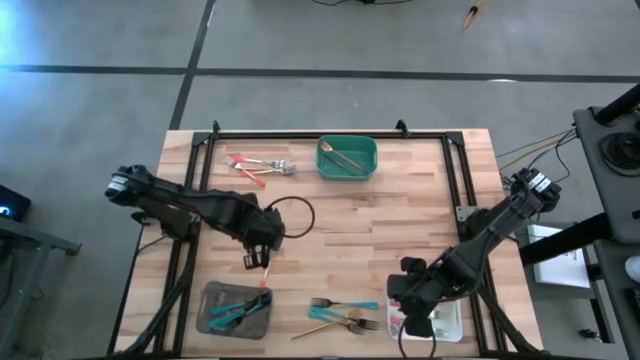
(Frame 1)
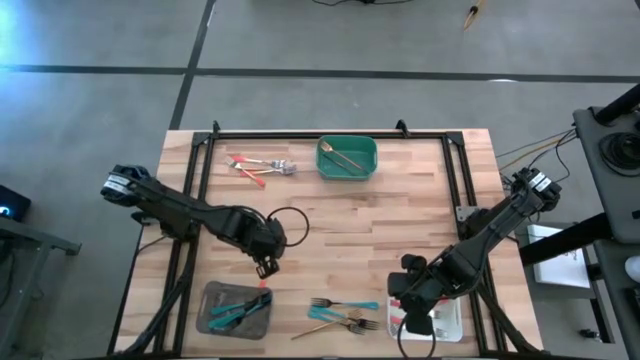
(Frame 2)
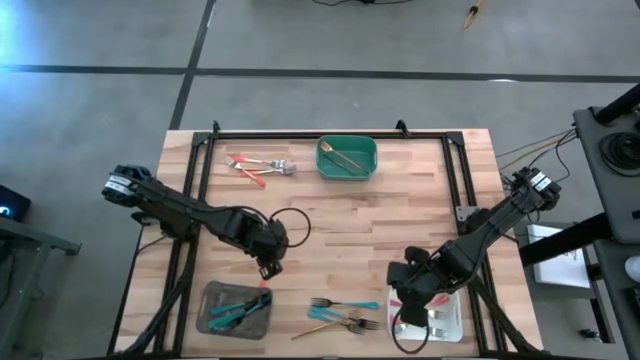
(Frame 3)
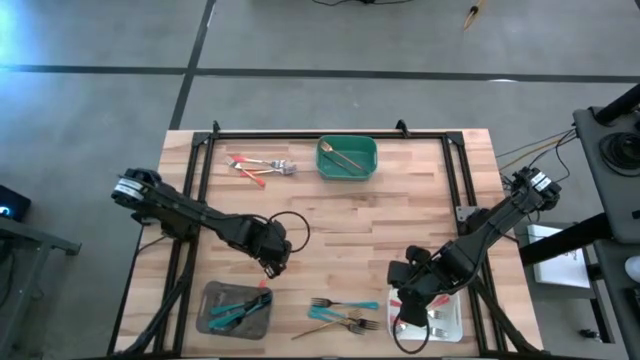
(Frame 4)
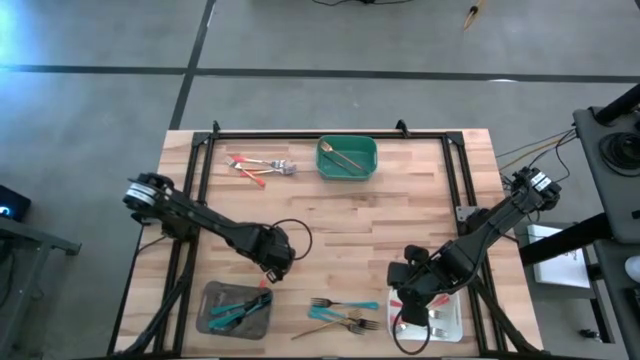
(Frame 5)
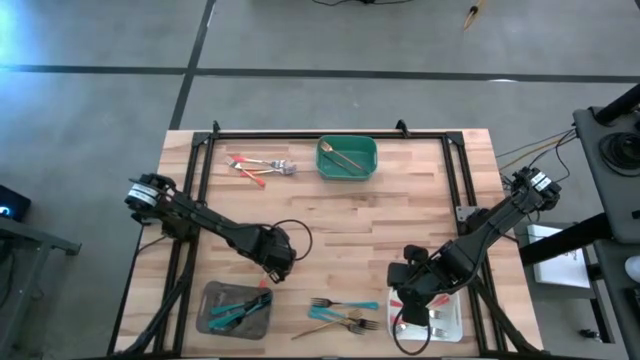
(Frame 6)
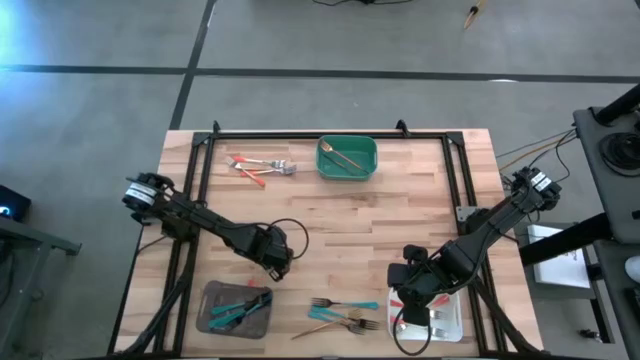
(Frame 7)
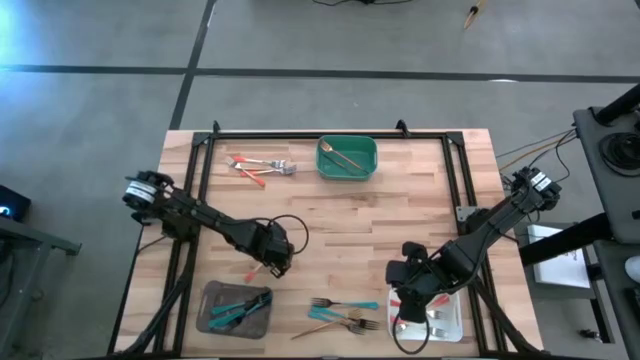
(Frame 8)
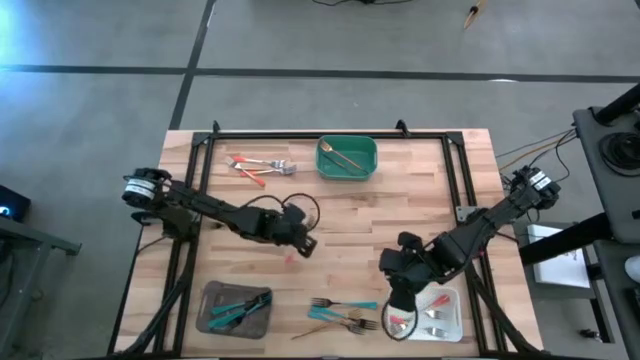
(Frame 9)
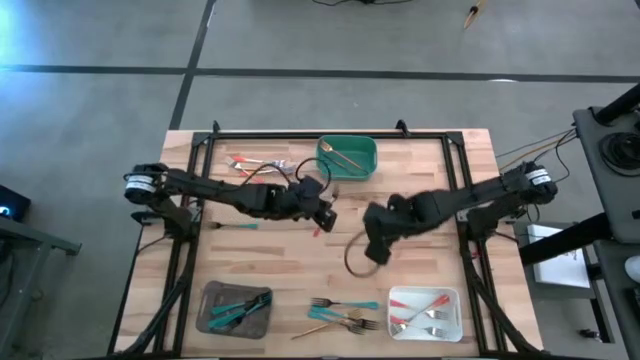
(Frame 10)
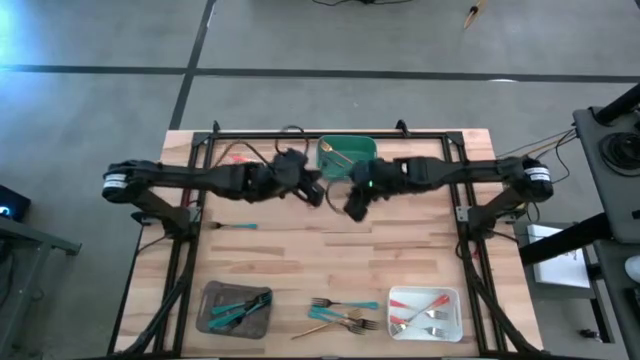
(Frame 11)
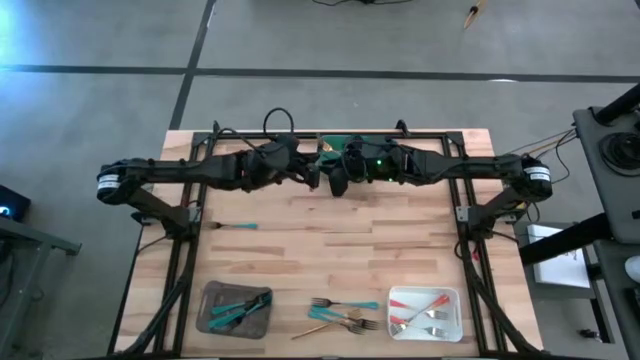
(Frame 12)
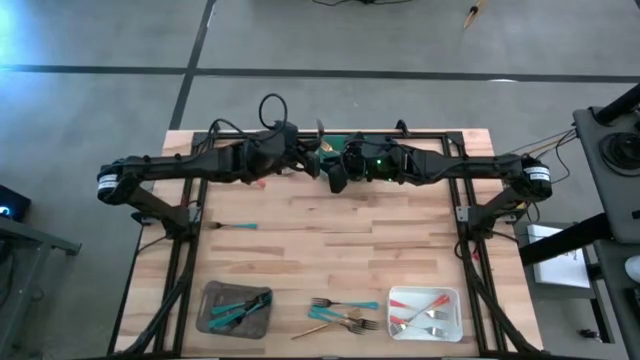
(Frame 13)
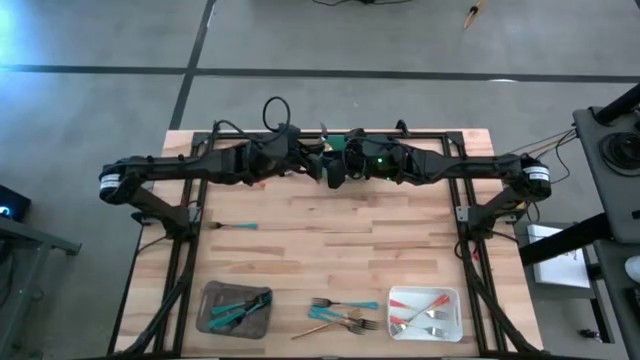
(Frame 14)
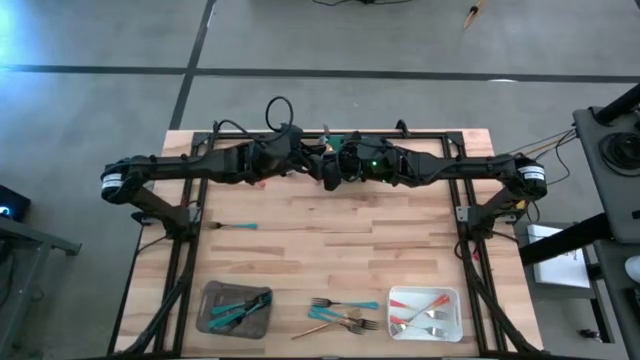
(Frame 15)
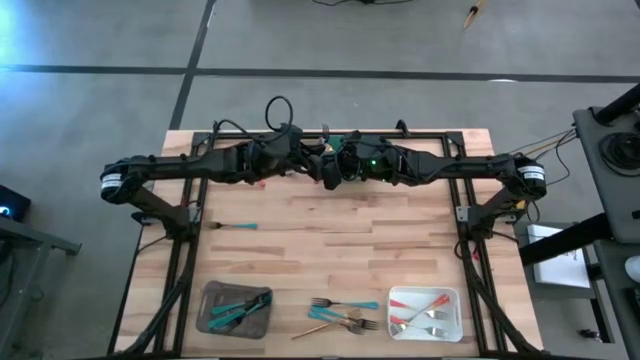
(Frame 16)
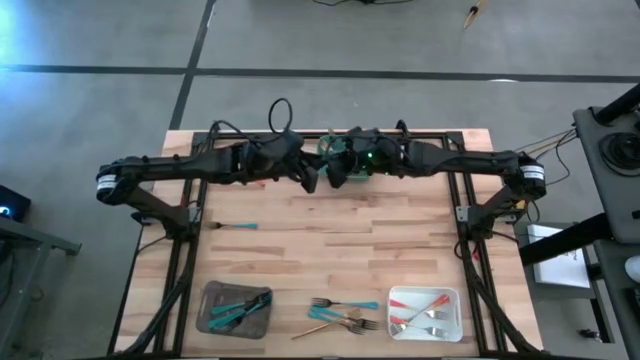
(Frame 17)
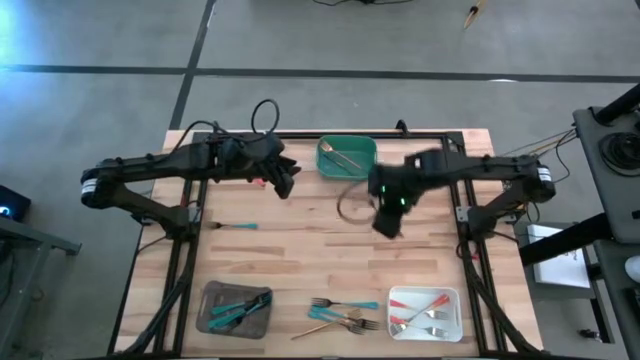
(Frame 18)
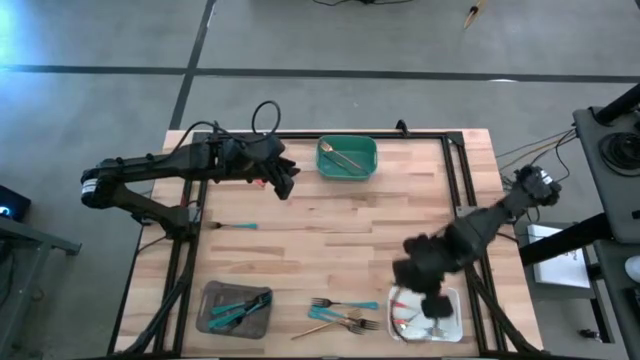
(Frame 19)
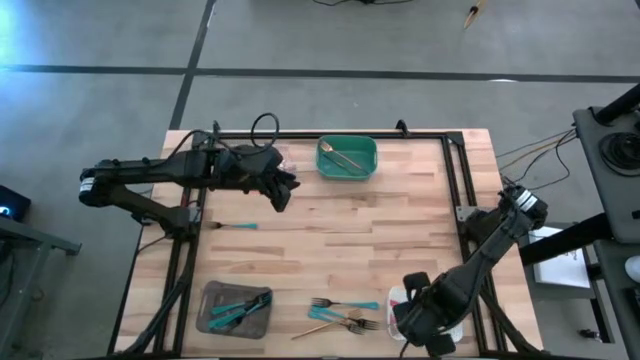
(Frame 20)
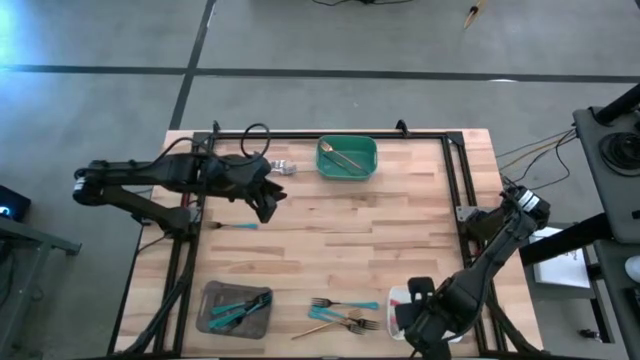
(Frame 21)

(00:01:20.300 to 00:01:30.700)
Task: Sort silverware by color (type)
Put the orange fork into the white bin

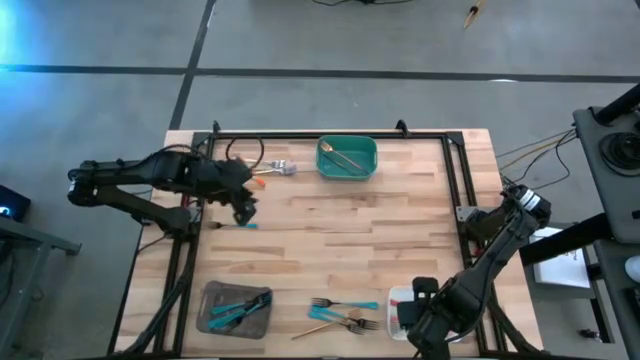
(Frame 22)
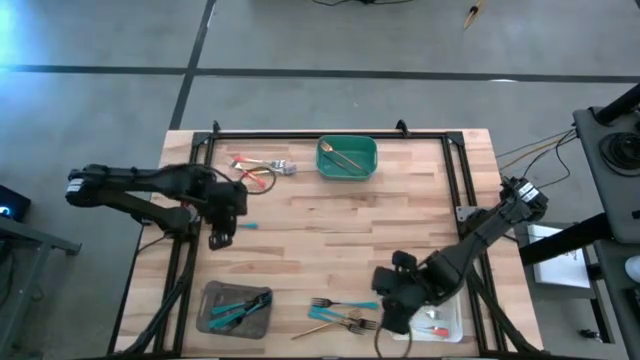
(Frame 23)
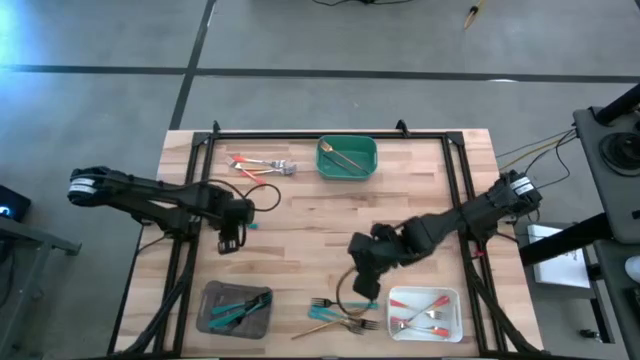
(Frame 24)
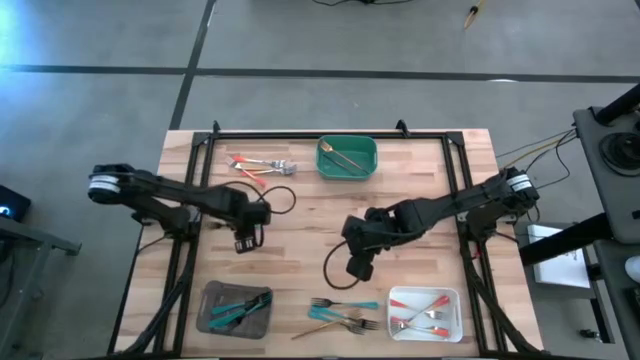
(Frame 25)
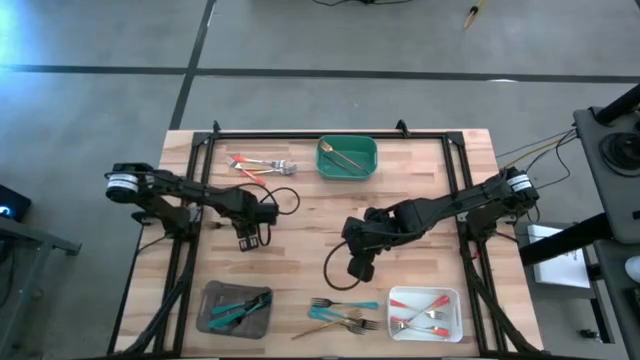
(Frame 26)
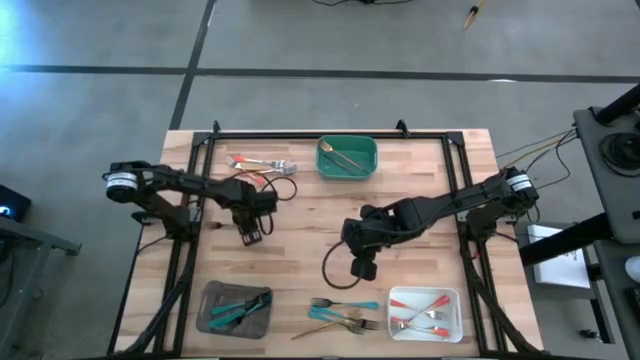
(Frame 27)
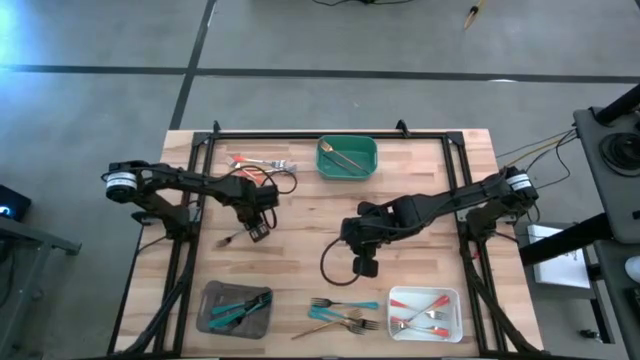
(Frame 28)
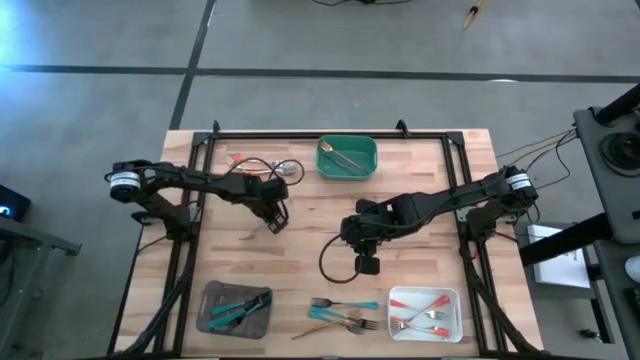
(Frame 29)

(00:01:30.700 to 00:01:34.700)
Put the blue fork into the black bin

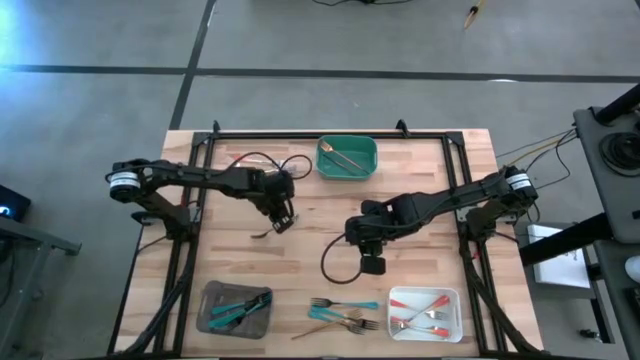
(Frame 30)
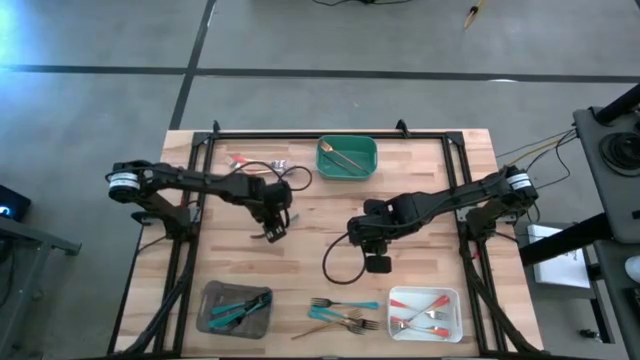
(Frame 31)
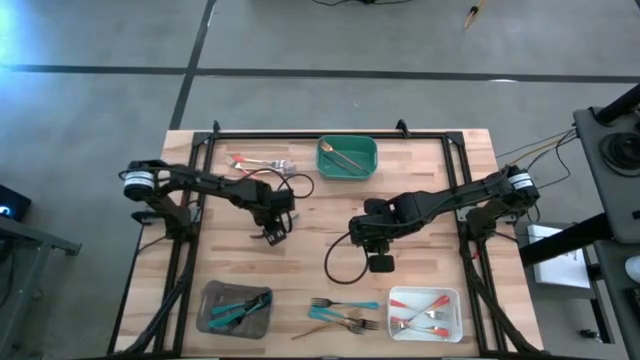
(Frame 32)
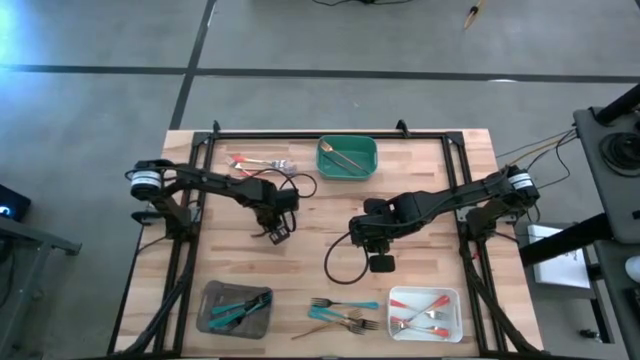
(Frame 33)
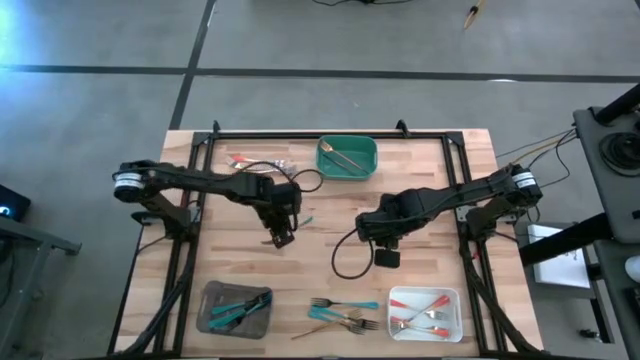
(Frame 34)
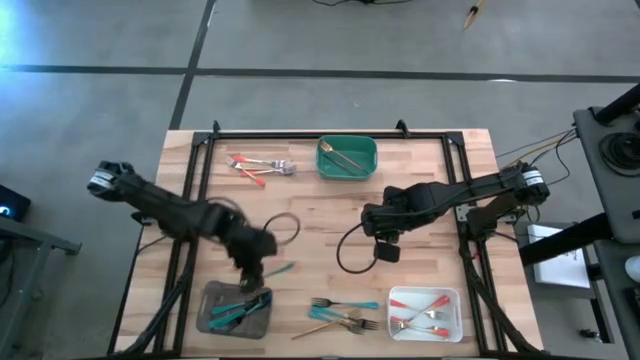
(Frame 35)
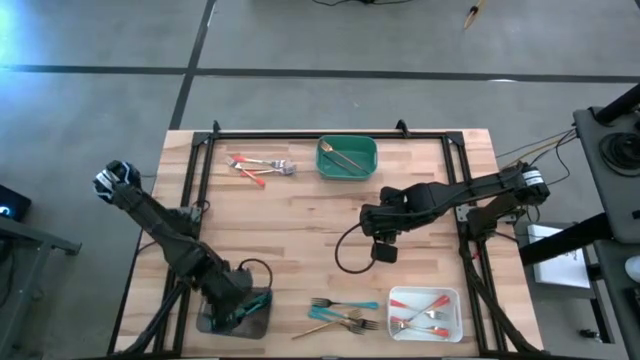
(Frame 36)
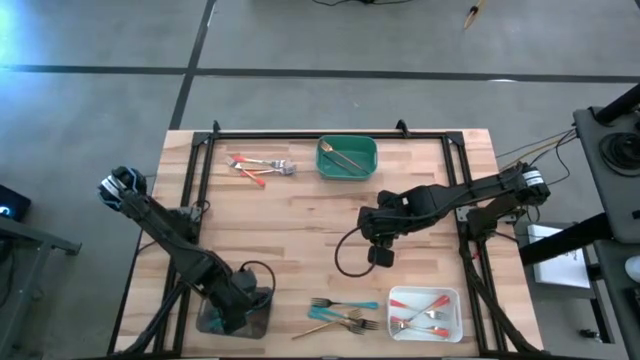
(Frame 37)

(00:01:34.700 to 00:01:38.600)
Put the blue fork into the black bin
